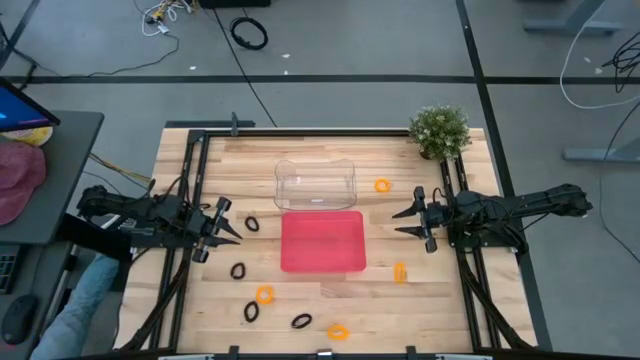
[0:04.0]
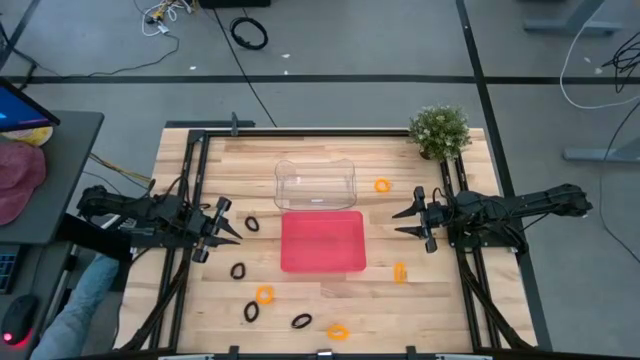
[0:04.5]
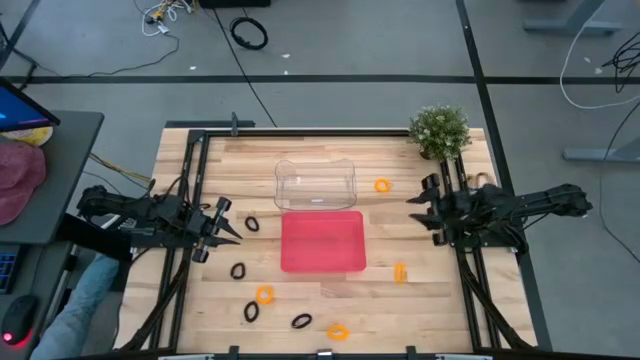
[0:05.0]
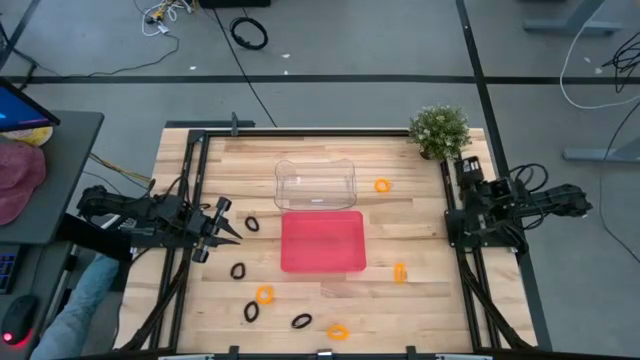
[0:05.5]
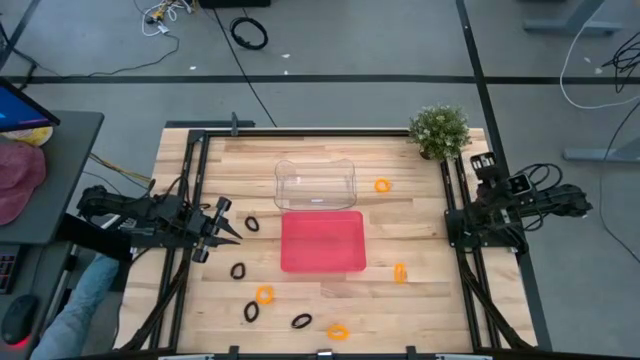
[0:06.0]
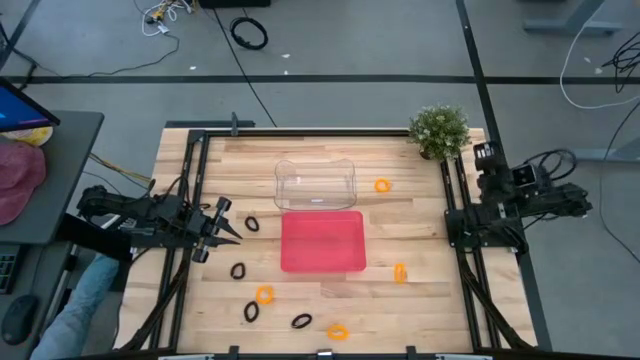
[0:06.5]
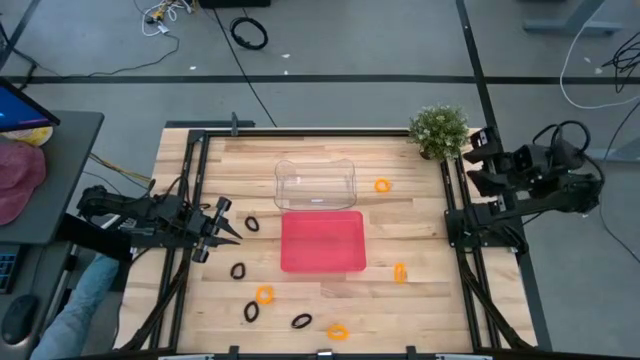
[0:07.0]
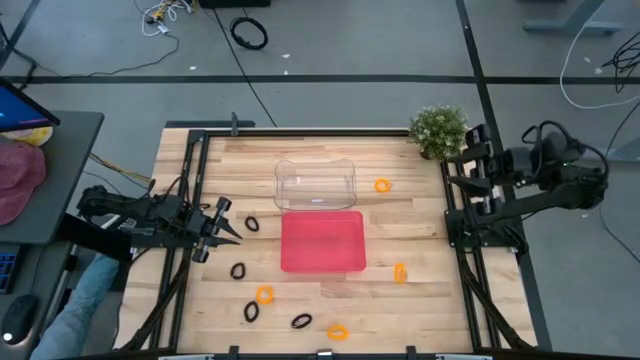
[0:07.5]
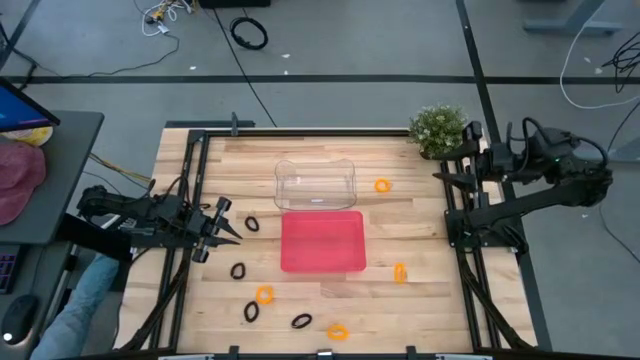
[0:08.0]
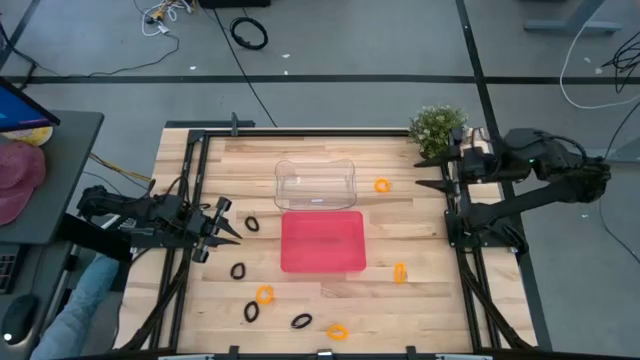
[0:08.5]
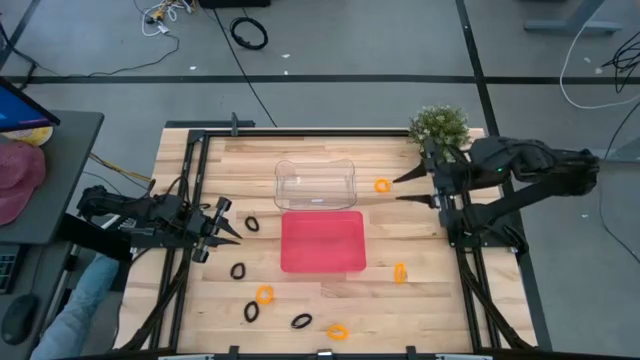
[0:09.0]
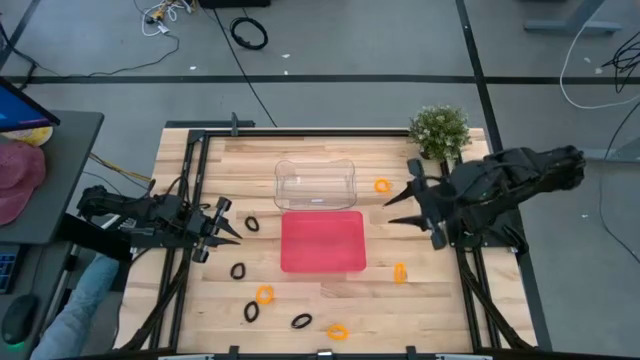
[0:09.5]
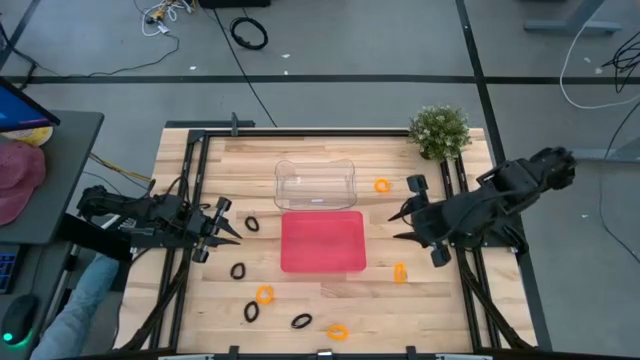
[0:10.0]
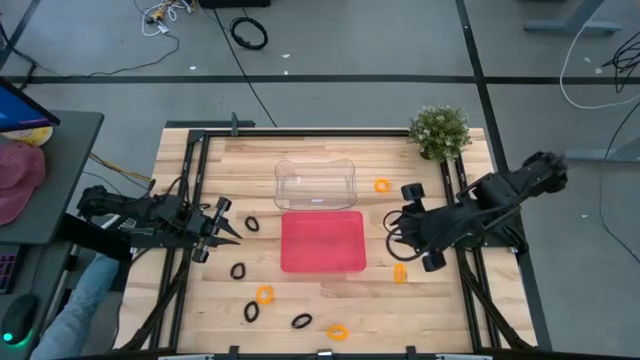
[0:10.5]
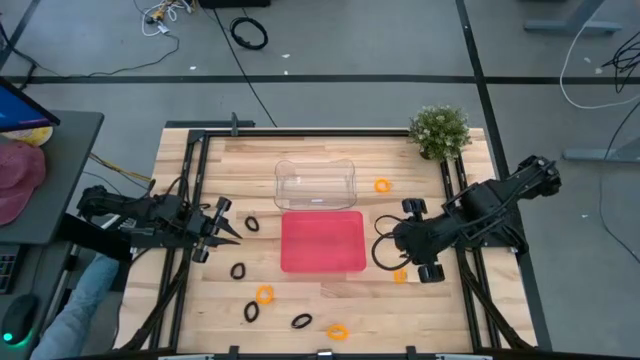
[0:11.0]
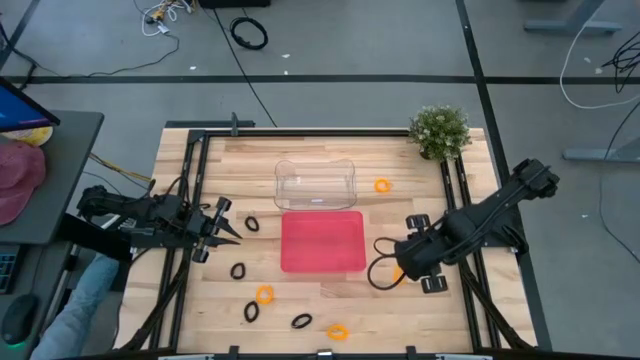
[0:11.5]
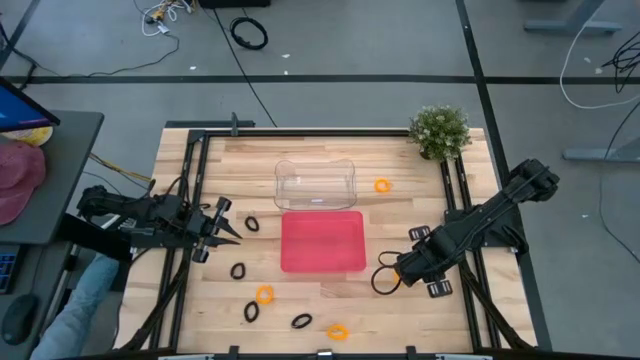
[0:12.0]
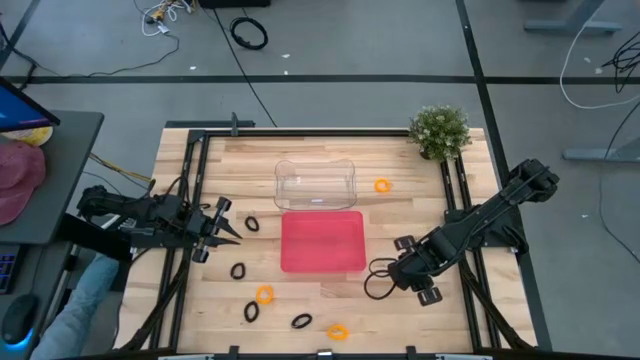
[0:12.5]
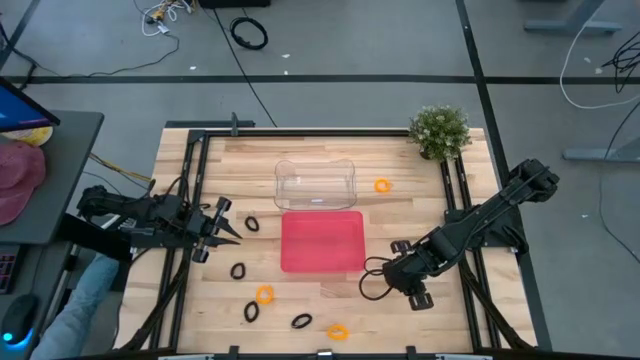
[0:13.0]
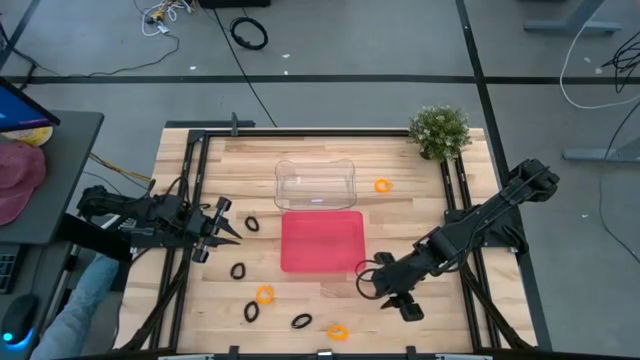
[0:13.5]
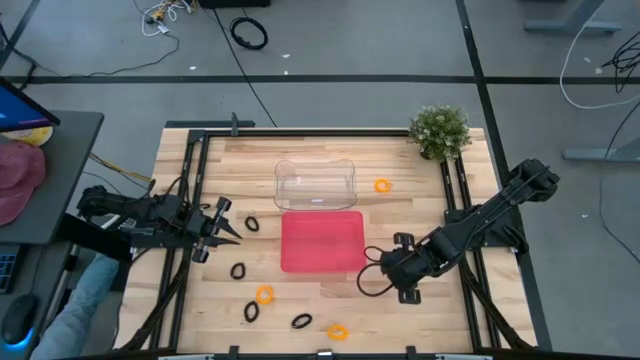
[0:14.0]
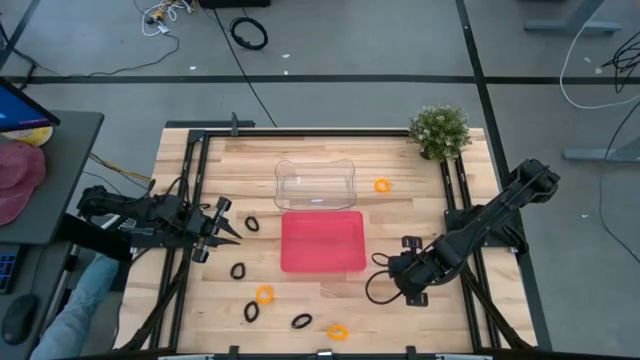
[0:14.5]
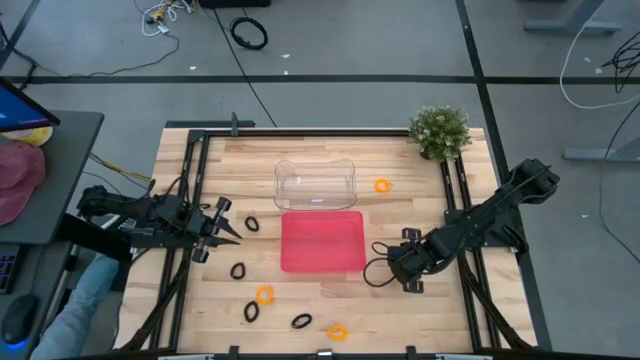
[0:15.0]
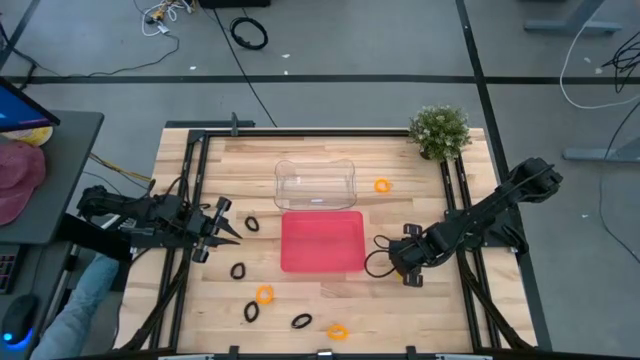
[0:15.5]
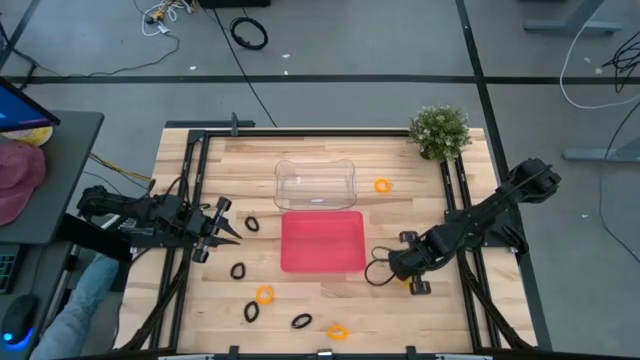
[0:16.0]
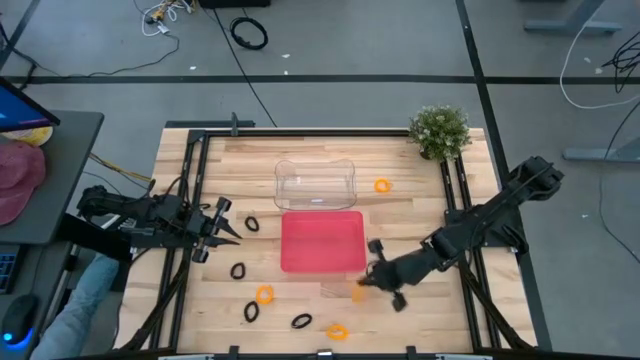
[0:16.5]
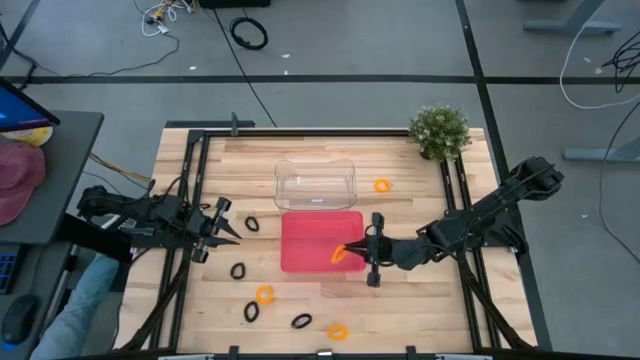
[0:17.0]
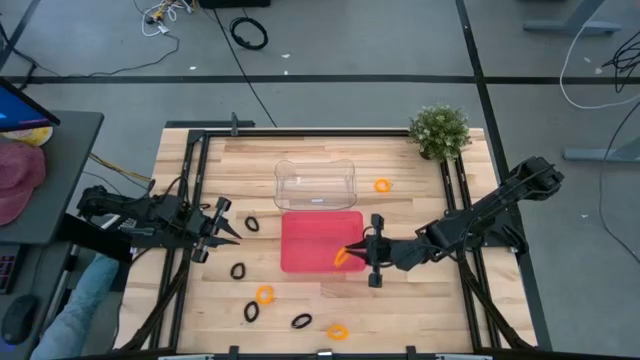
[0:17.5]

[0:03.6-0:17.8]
Task: Sort spring keychains
Put the middle right orange spring keychain into the pink bin

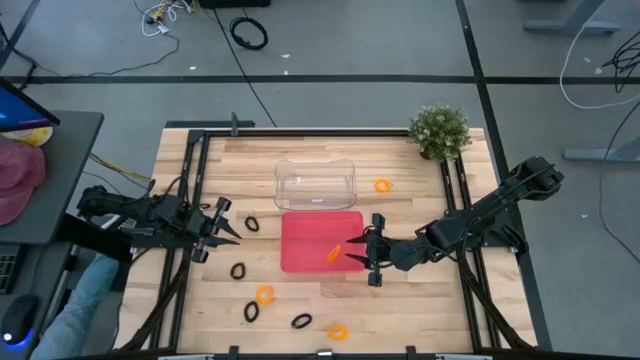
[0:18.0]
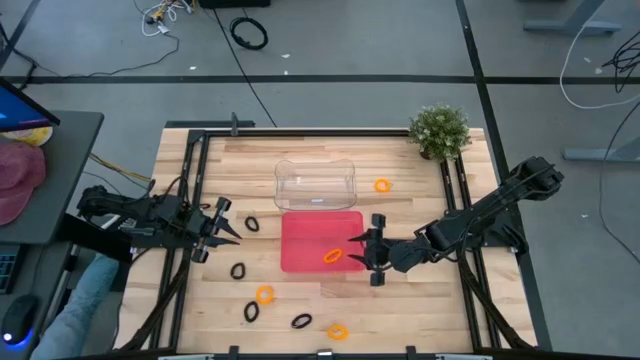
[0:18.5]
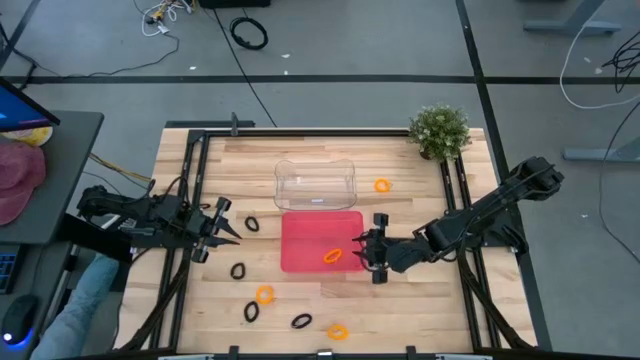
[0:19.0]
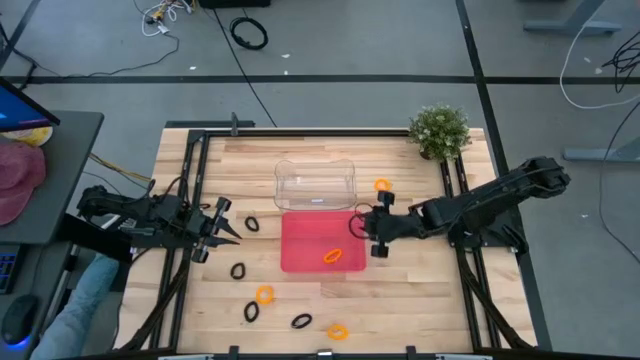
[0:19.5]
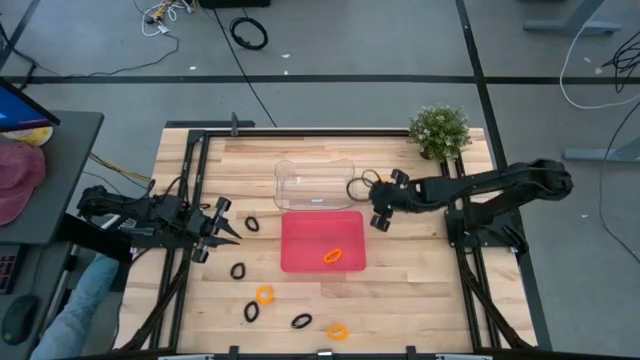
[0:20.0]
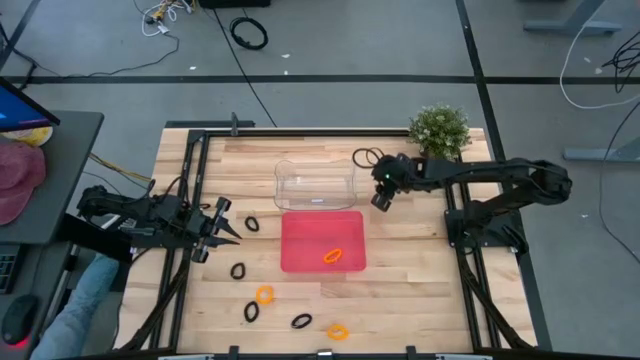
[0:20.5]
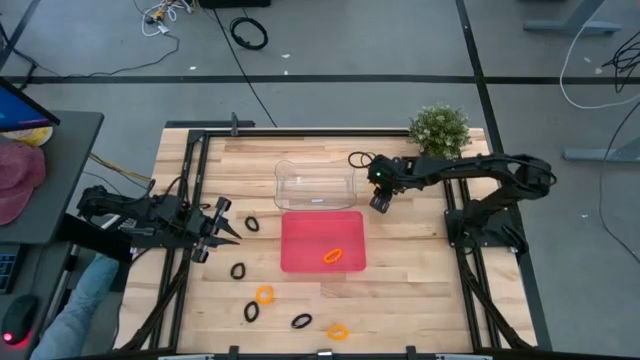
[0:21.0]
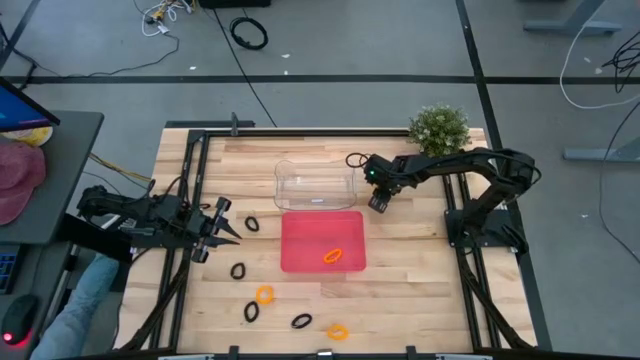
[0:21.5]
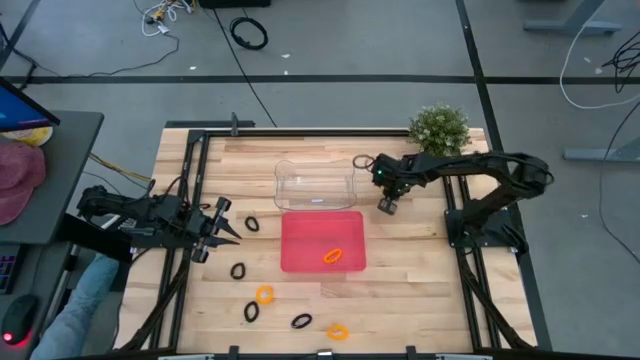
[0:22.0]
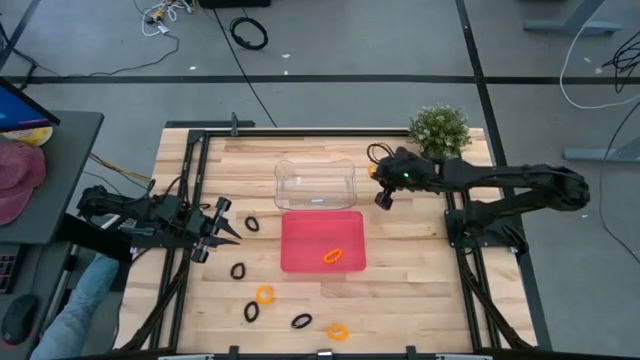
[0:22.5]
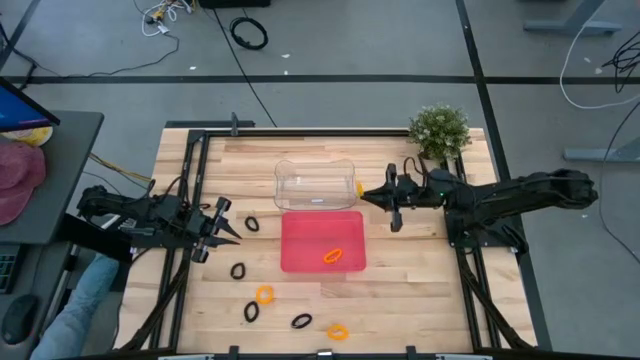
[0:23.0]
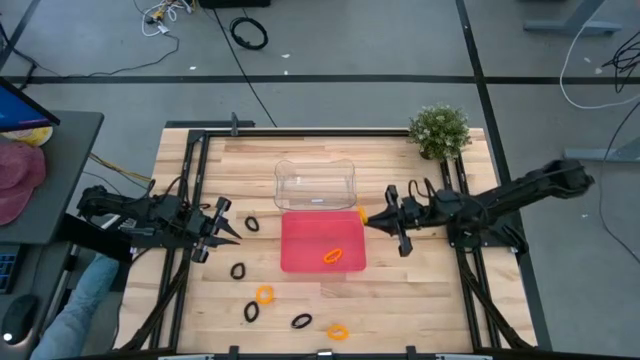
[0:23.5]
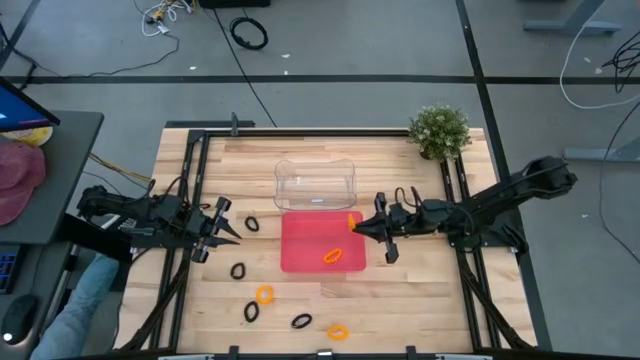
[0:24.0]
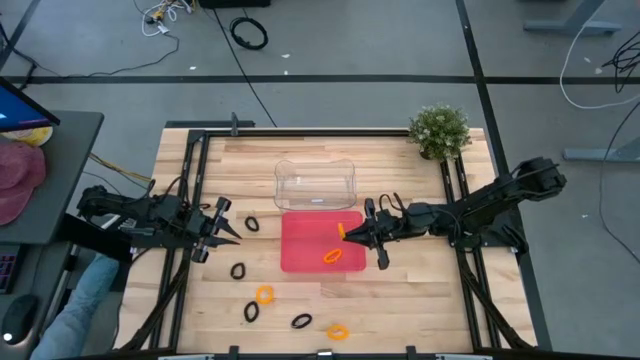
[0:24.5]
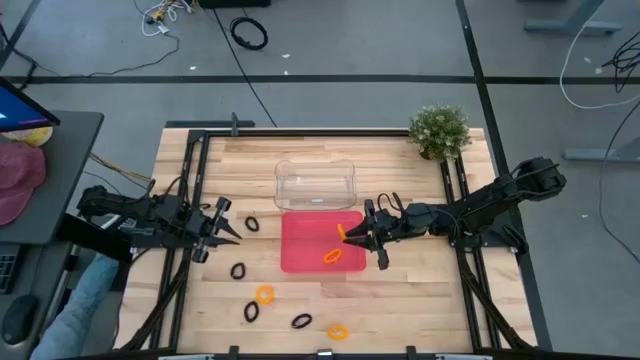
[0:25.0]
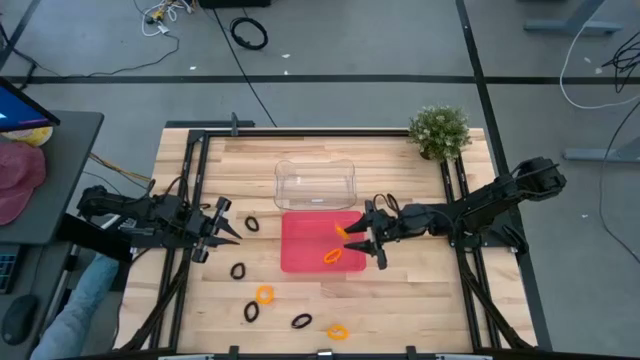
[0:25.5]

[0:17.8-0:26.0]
Put the top right orange spring keychain into the pink bin
